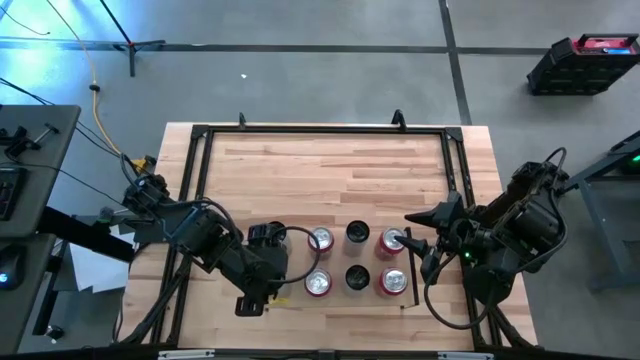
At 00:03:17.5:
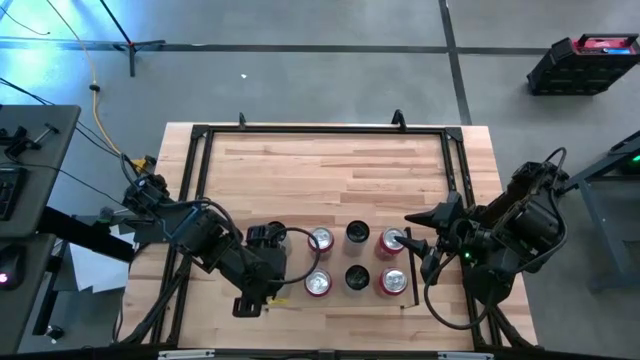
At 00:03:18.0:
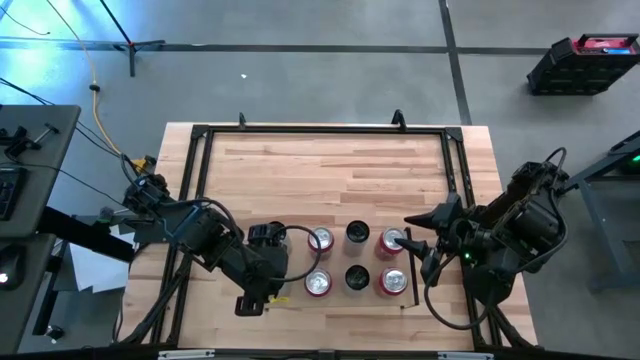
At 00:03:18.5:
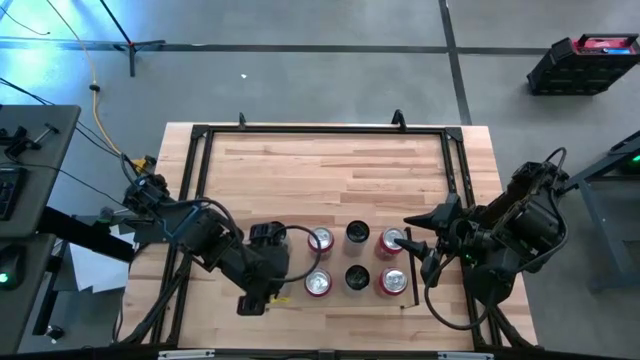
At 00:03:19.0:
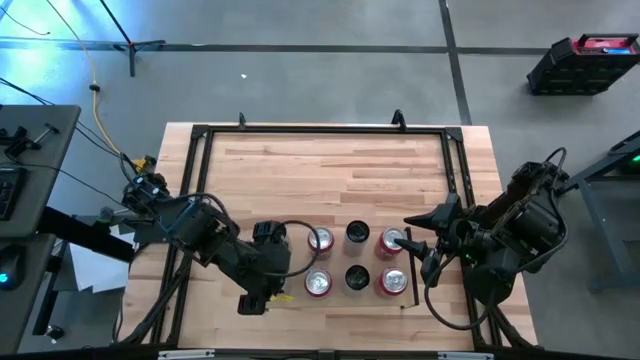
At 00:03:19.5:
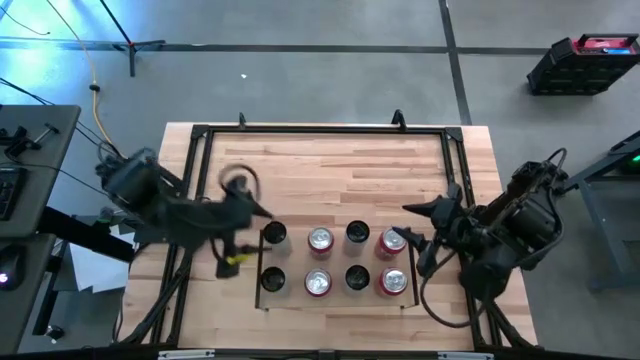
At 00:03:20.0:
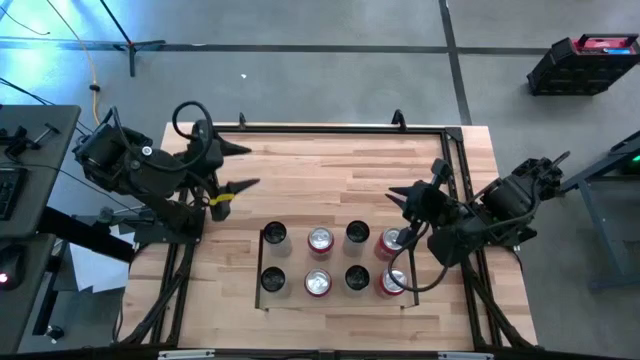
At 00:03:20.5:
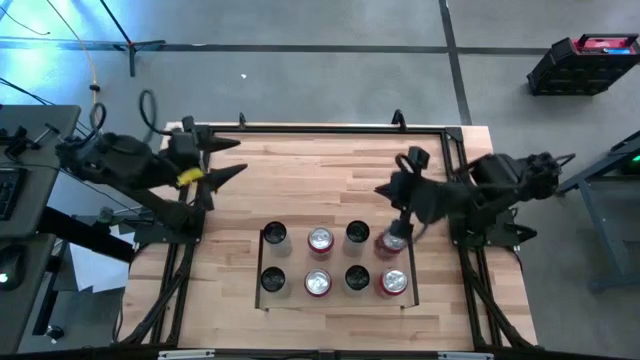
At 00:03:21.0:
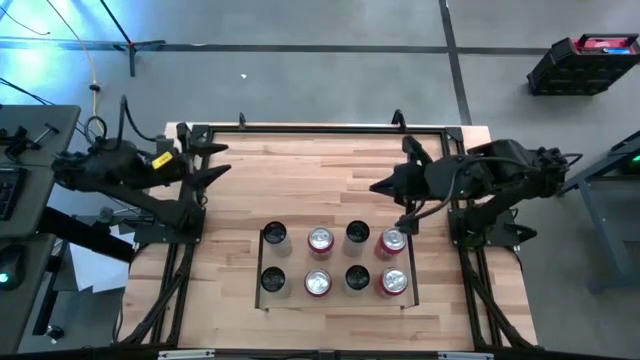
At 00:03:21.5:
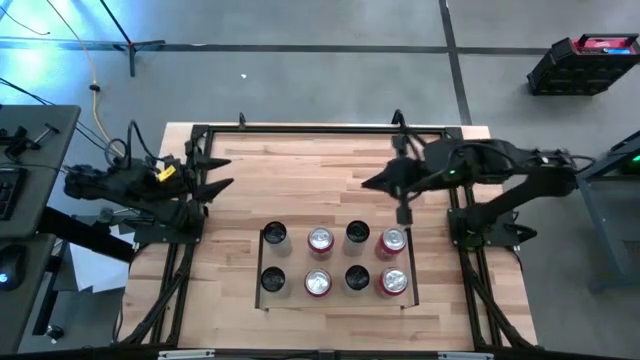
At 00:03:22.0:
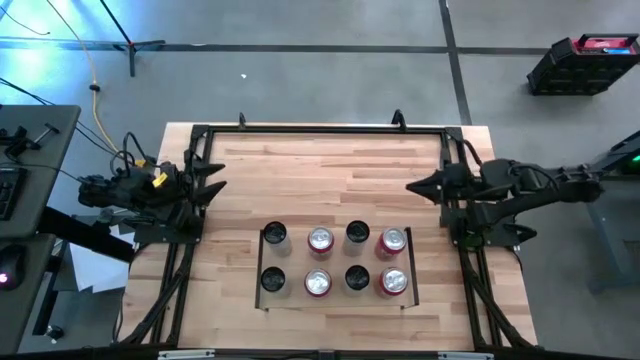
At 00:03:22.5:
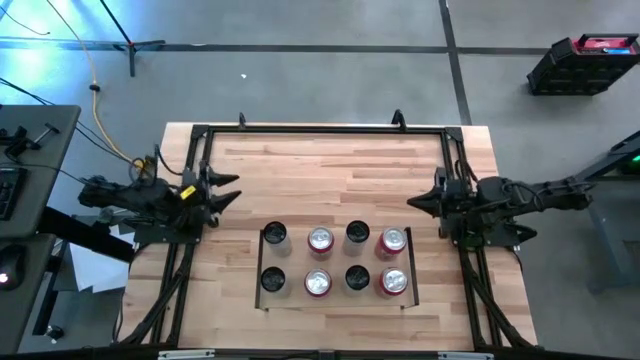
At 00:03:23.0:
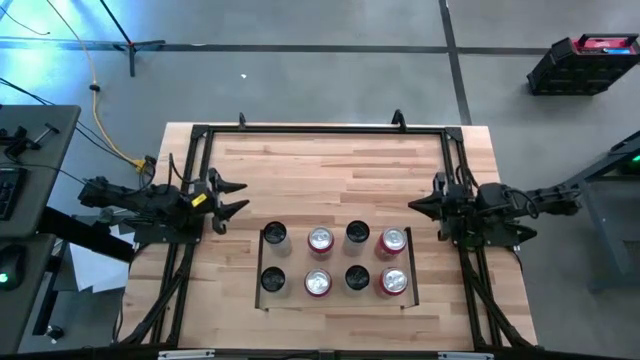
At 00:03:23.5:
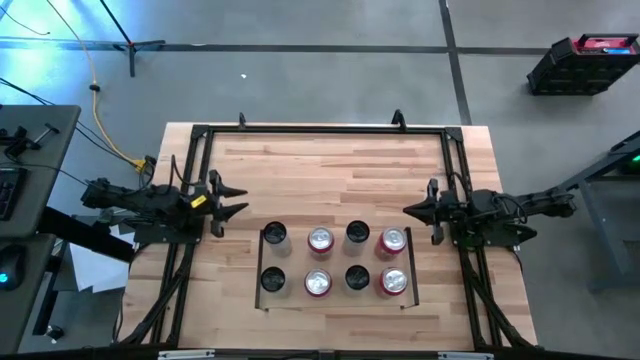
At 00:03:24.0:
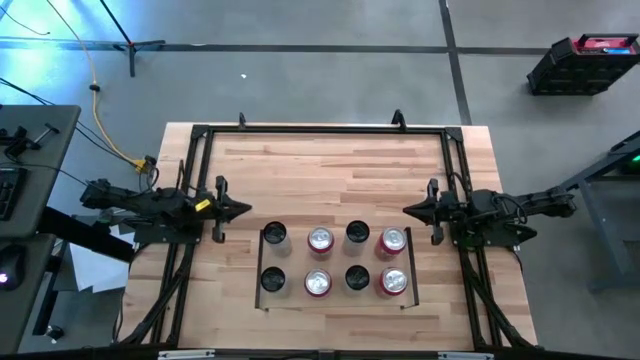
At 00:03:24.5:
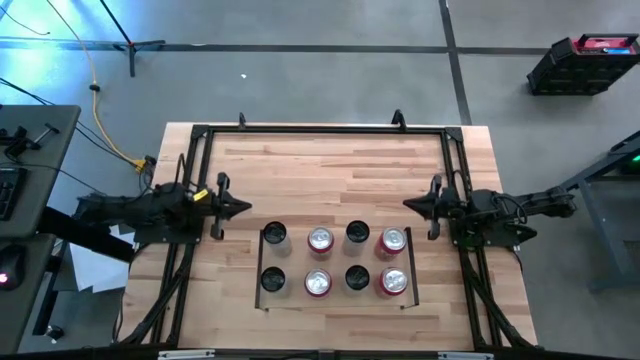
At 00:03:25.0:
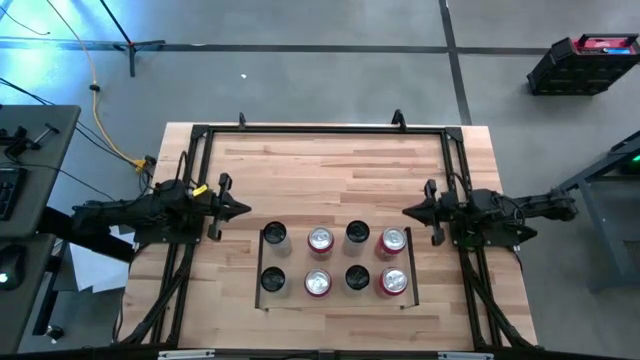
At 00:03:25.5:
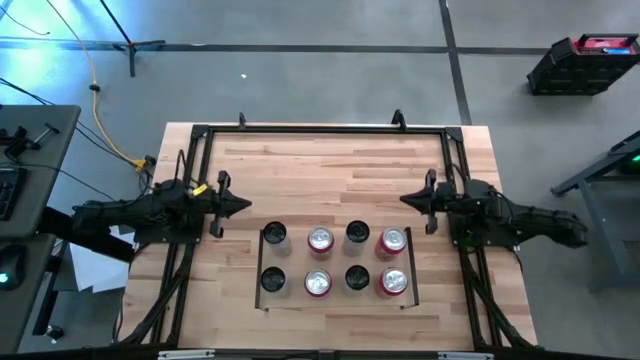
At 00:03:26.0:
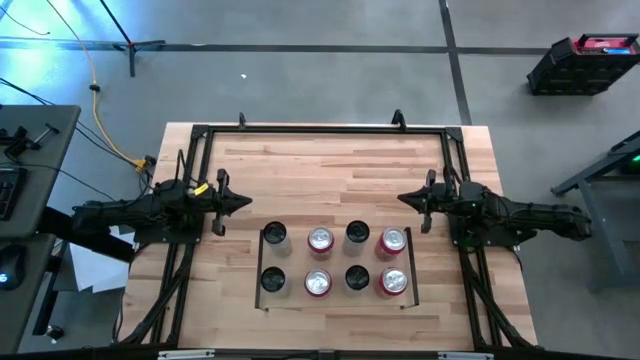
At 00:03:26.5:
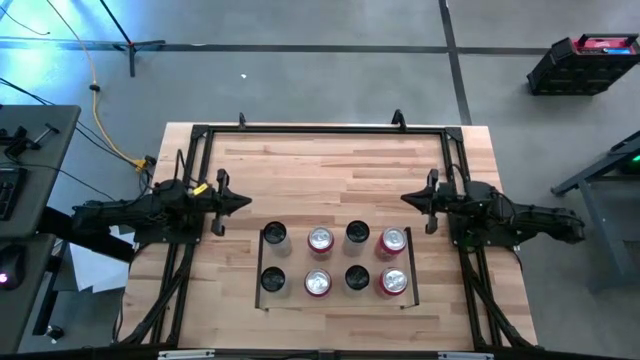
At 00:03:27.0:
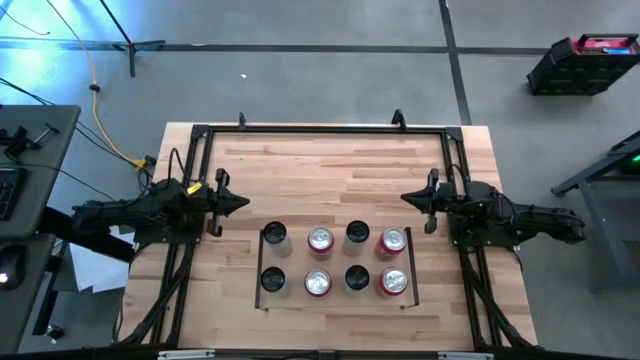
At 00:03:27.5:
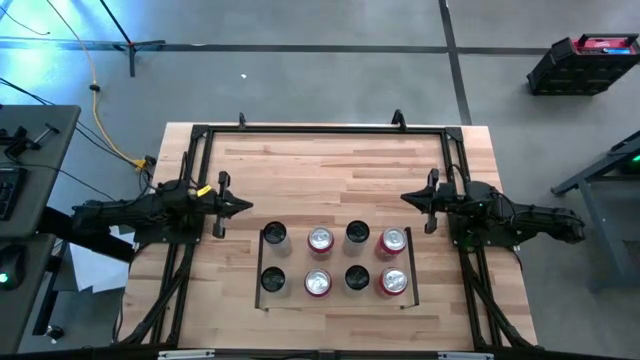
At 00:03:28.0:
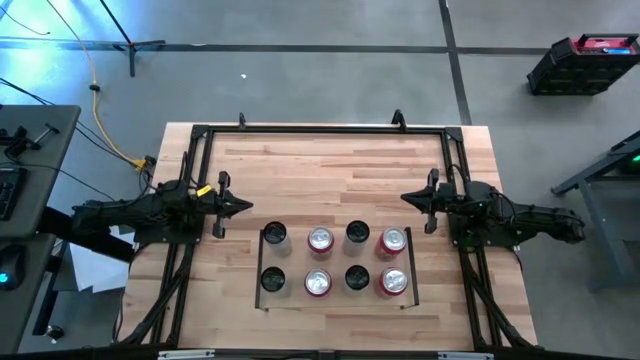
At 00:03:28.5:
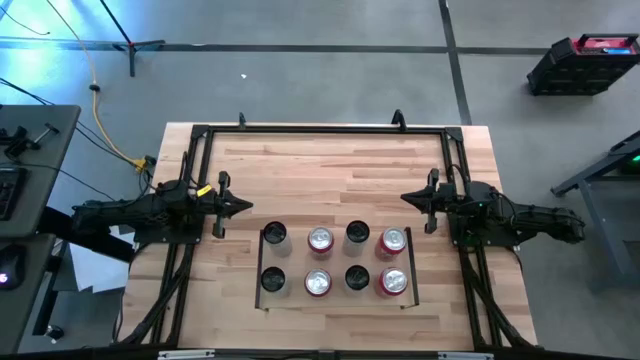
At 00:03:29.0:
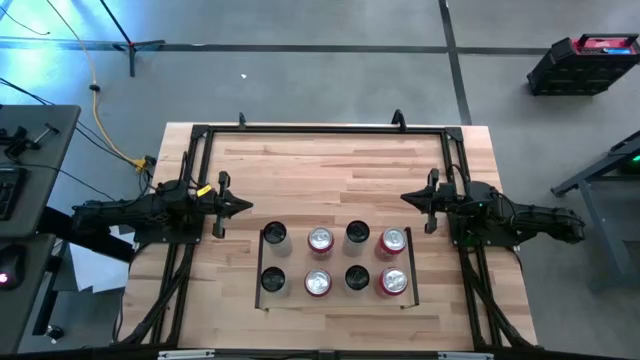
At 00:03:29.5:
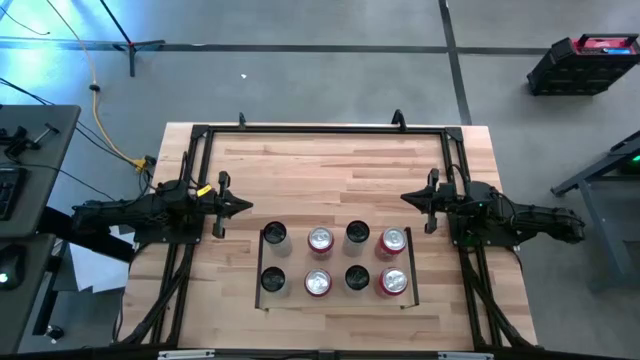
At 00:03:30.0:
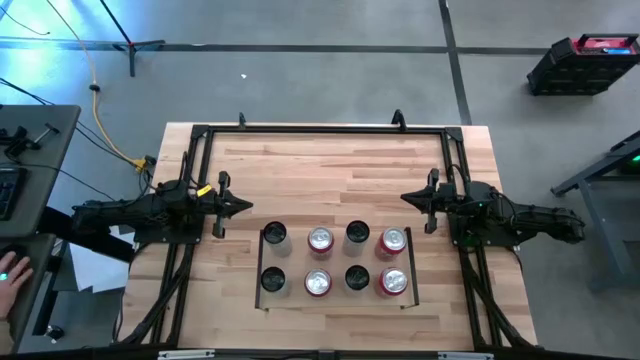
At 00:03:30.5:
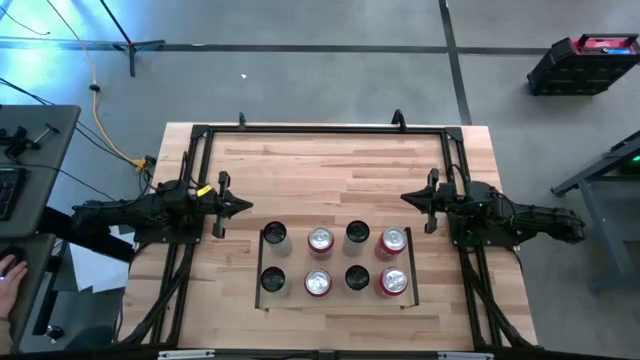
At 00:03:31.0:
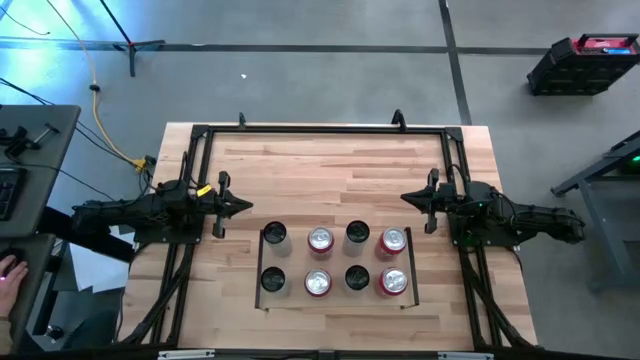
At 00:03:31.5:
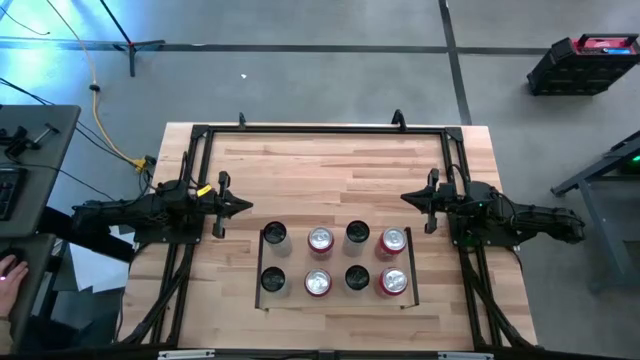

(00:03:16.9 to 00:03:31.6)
Task: Place canned beverage on shelf
Return to Home Position
